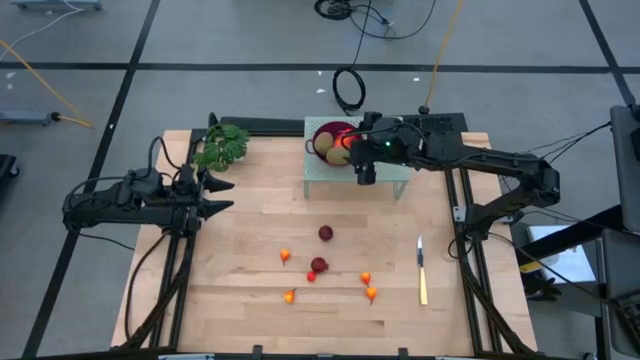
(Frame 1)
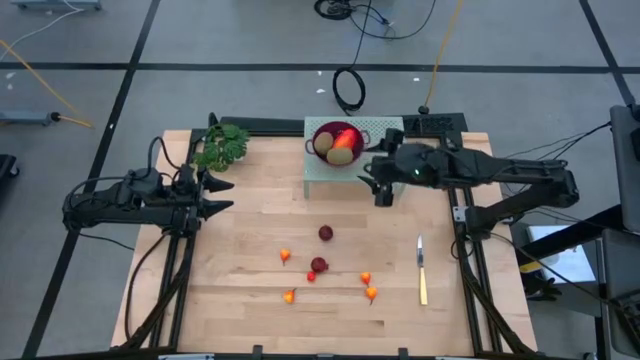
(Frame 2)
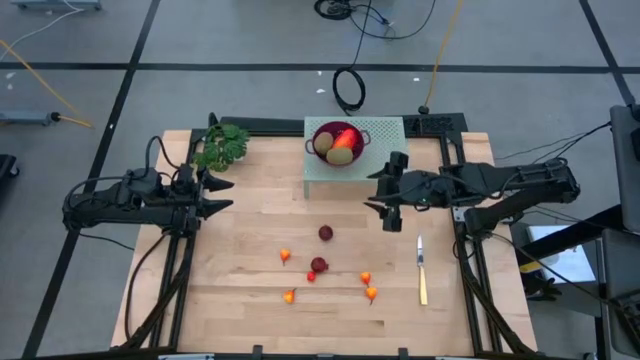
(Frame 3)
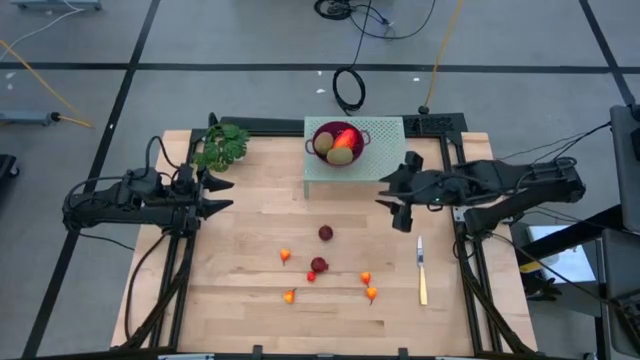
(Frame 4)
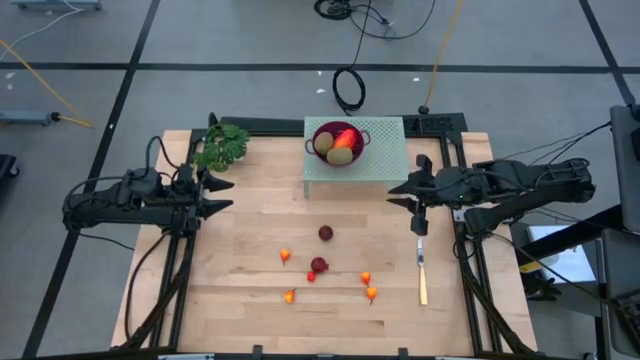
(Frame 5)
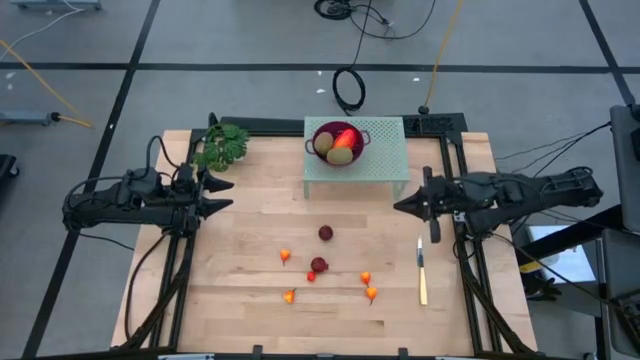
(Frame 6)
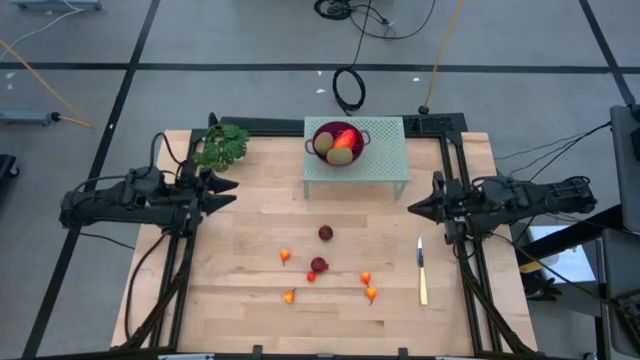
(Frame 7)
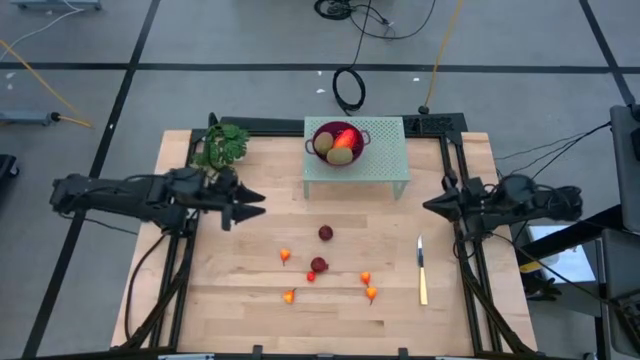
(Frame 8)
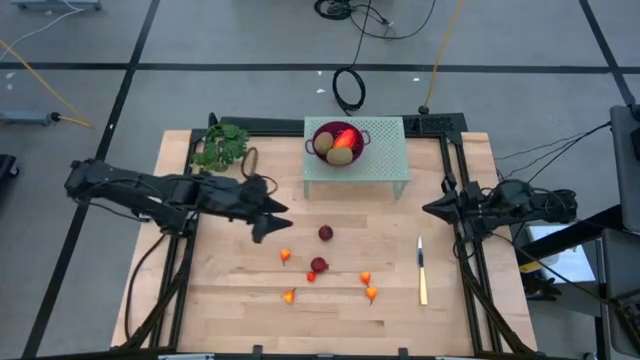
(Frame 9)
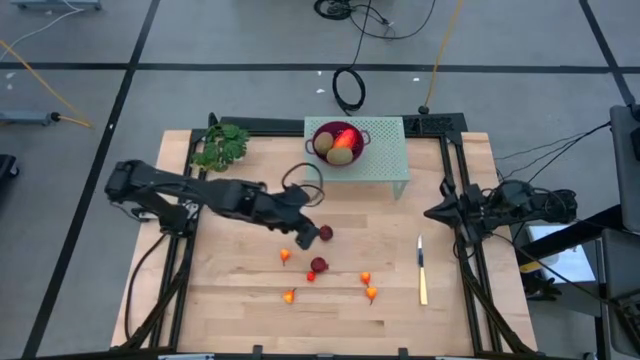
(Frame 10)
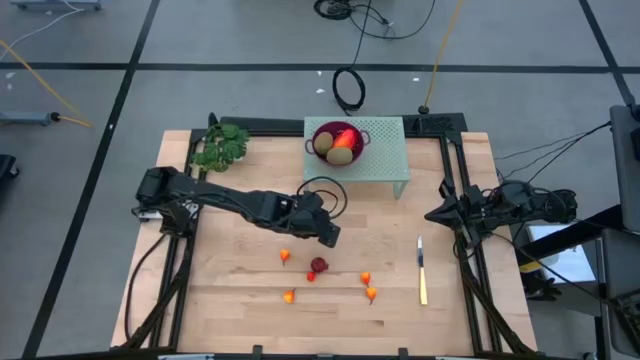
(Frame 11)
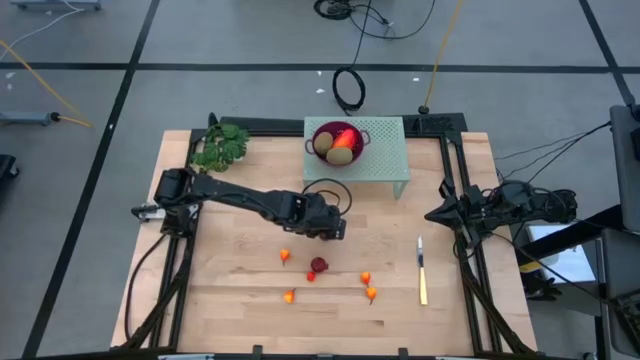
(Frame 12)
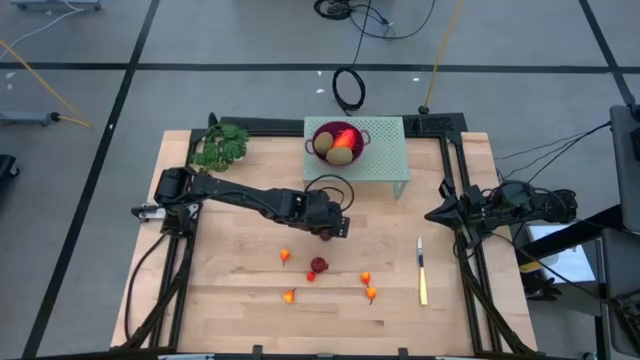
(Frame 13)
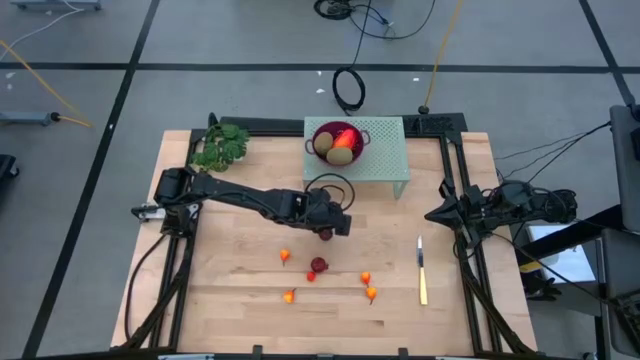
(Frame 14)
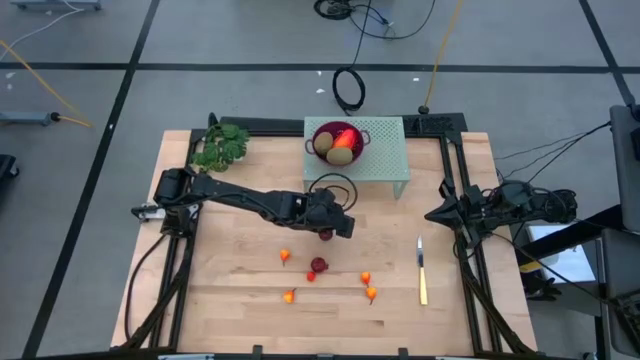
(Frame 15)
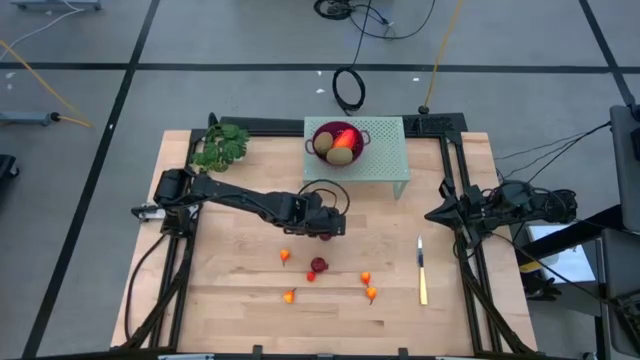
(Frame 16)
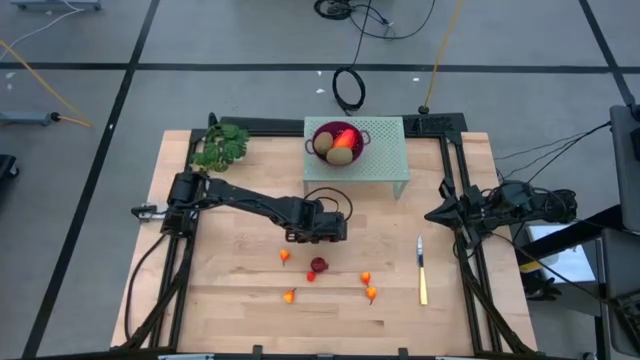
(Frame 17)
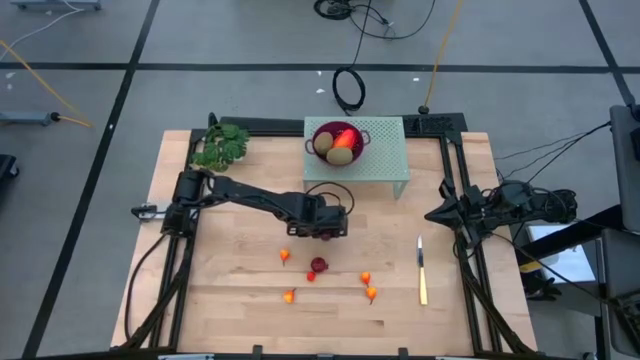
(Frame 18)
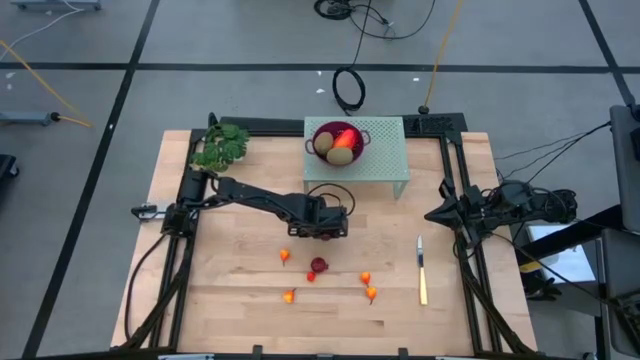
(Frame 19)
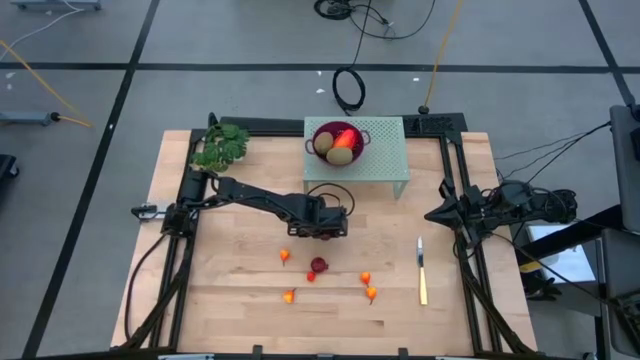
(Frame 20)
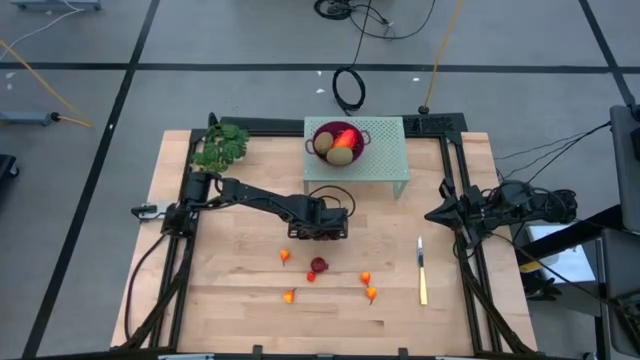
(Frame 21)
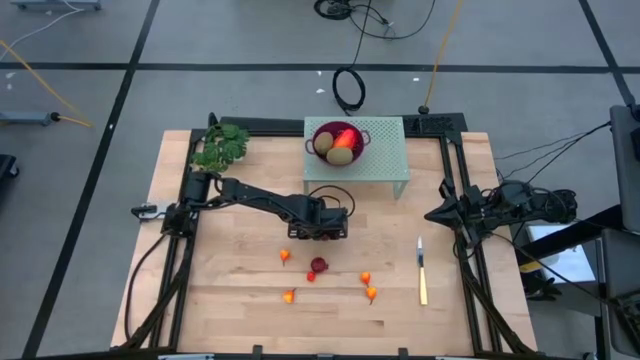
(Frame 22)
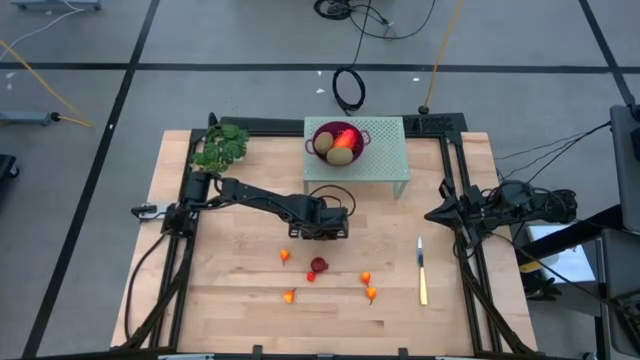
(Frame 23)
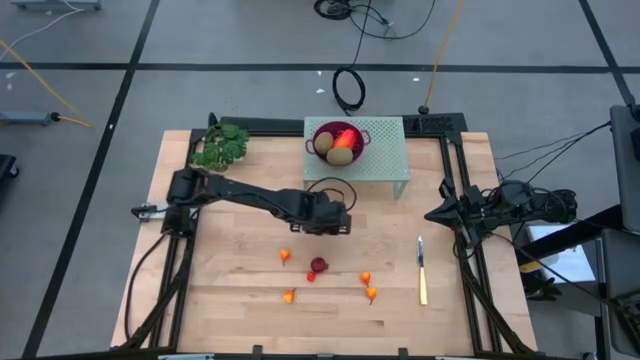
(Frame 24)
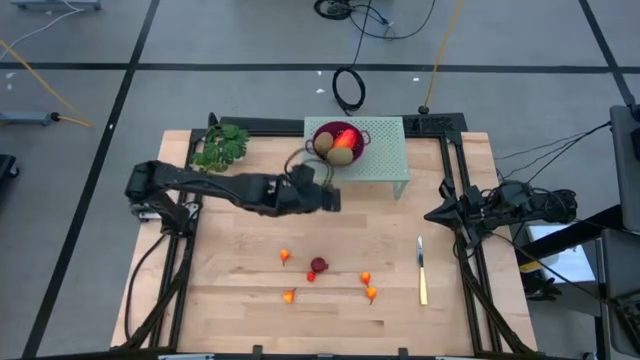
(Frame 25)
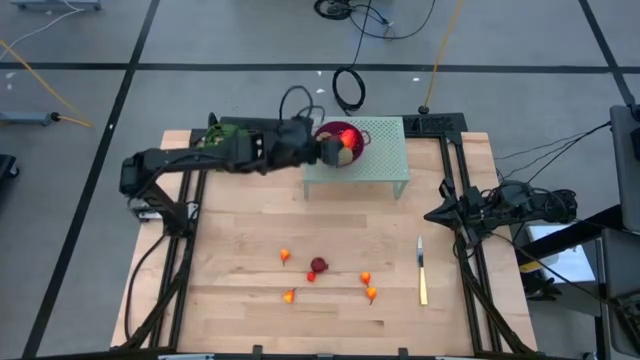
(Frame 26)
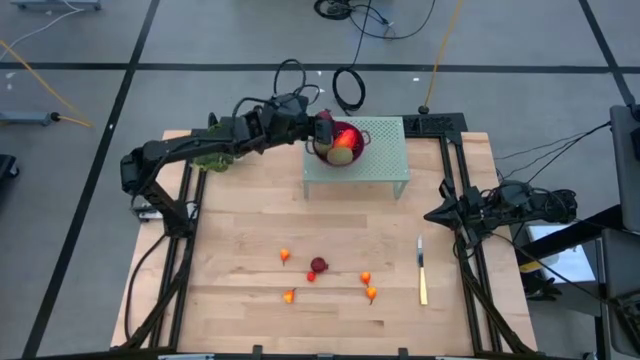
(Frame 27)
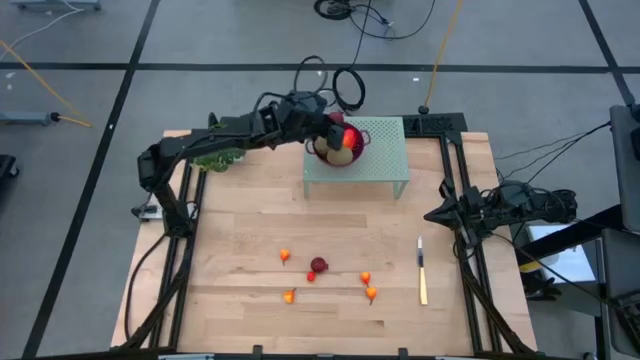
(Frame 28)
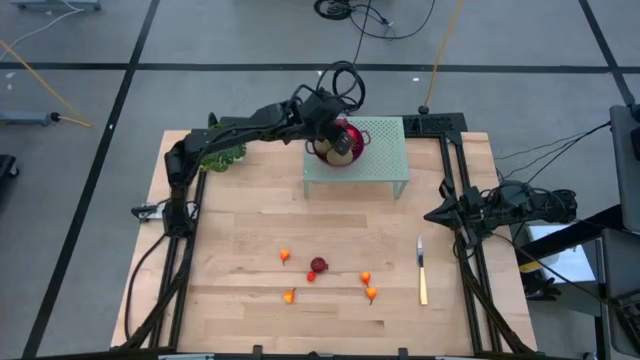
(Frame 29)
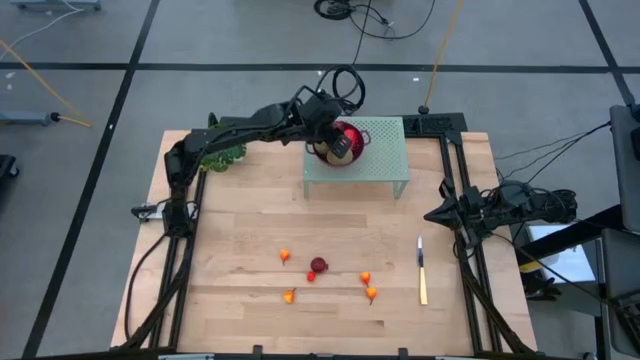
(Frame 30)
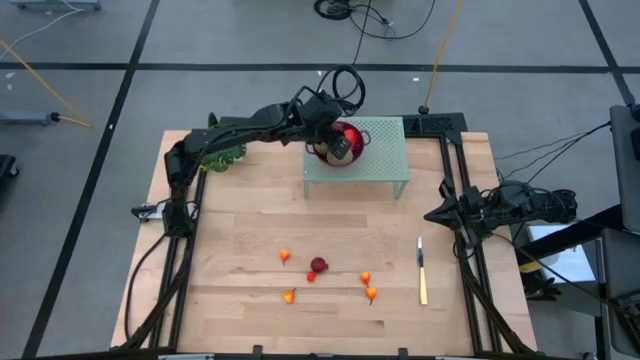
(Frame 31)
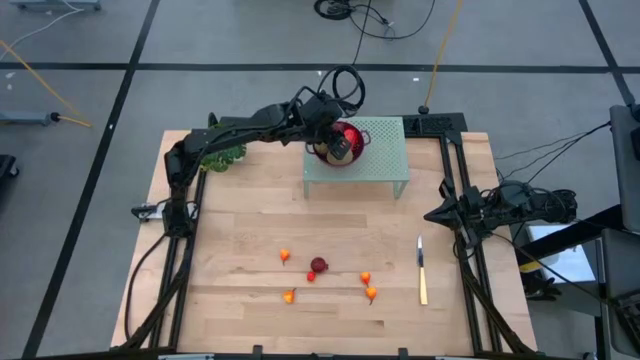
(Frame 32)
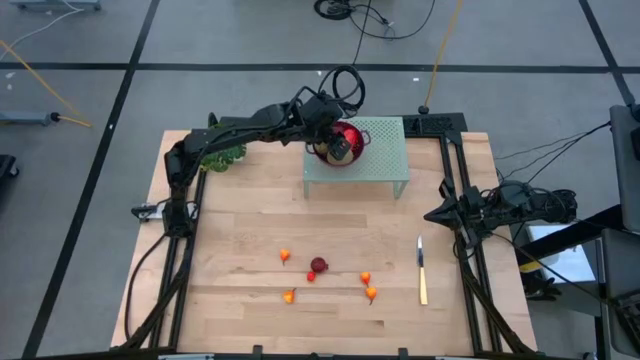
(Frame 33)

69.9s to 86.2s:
Task: Pick & Place Fruit
Put the top pomegranate into the strainer bowl

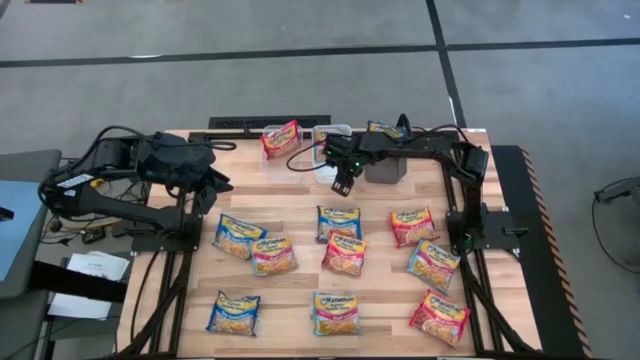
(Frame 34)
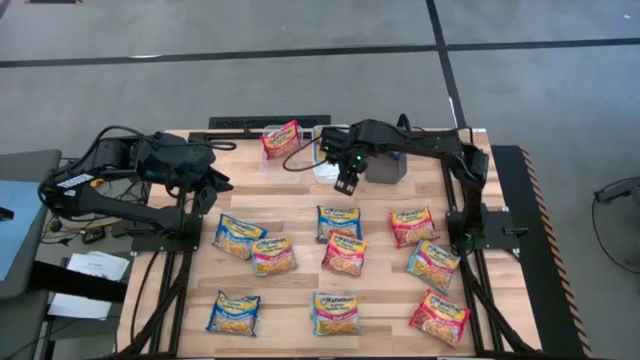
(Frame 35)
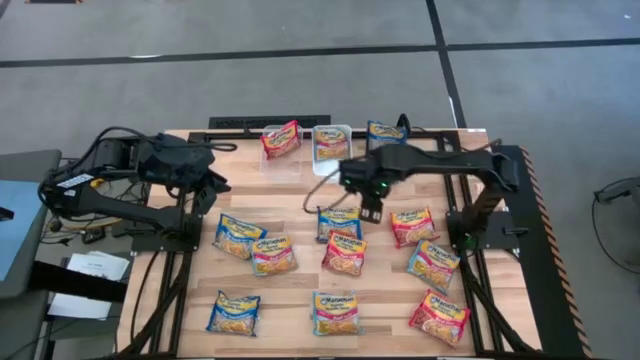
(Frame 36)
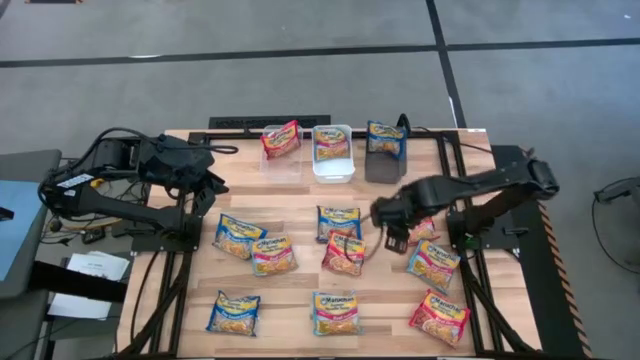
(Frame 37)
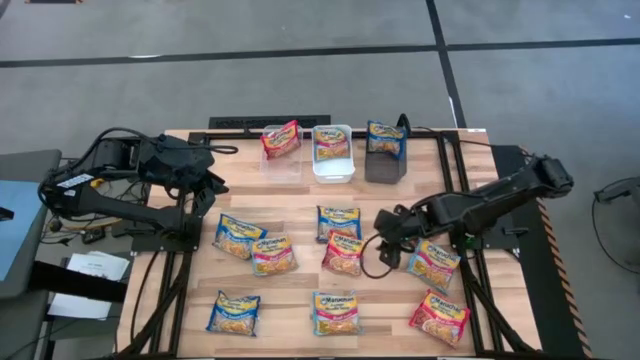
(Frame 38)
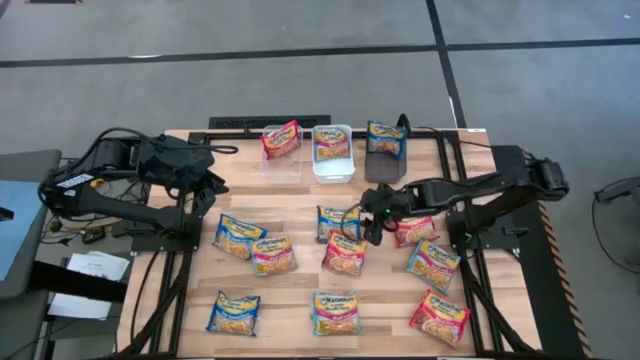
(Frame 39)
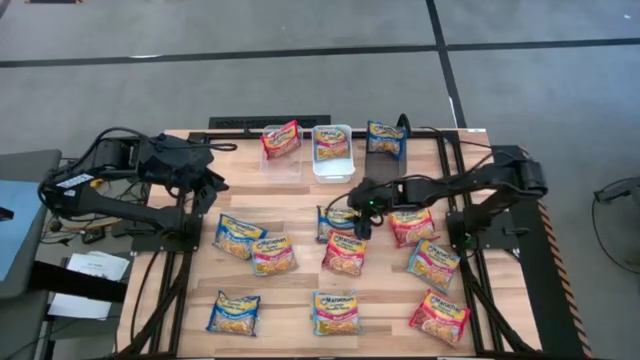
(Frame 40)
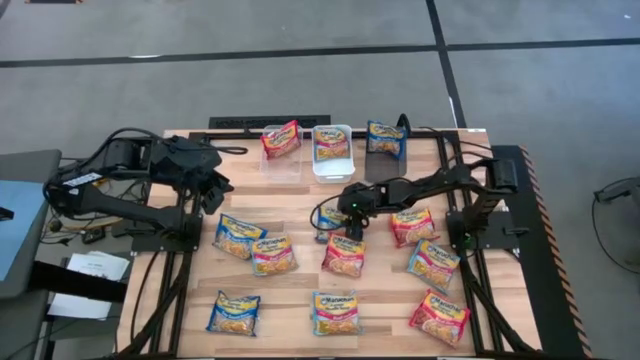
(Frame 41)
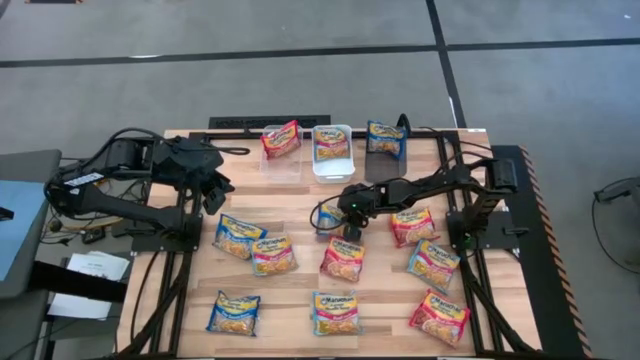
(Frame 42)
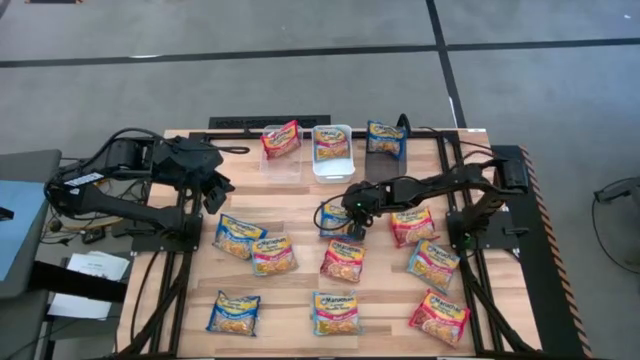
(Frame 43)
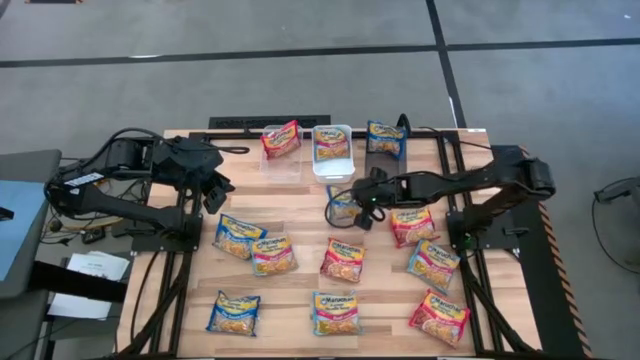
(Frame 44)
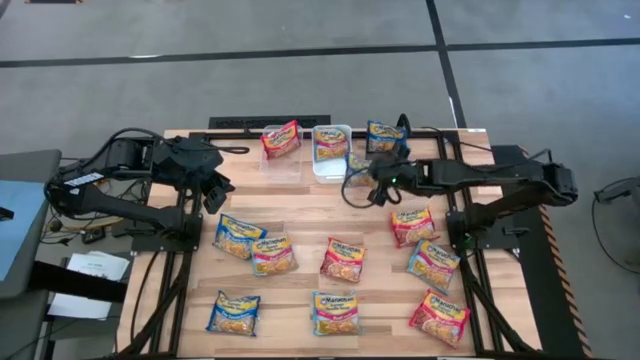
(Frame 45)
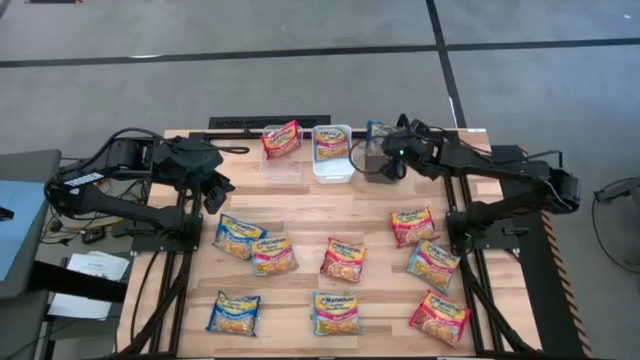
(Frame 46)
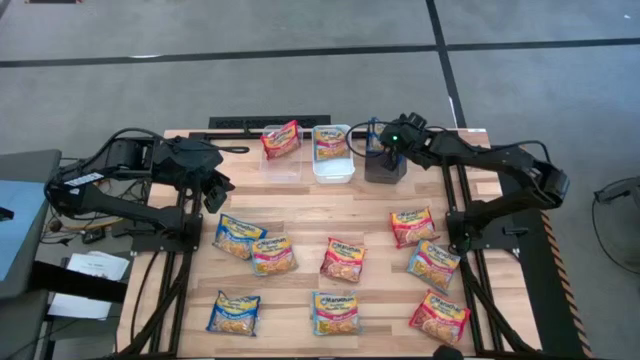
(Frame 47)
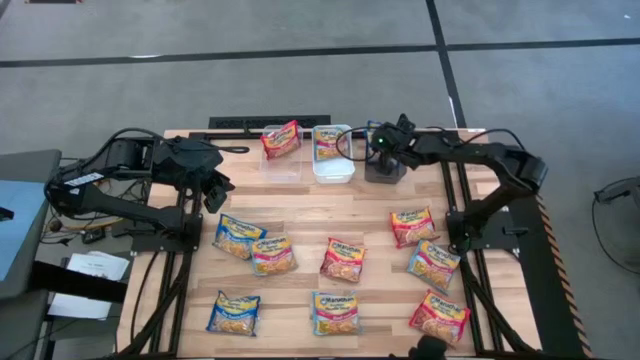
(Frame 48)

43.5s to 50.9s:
Task: Sort Maruchan noodles
Put the blue noodle pack into the black bin
